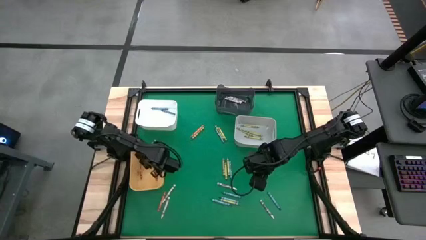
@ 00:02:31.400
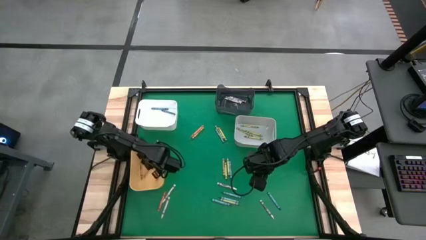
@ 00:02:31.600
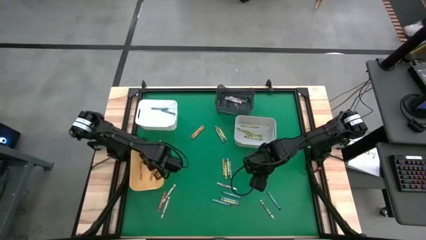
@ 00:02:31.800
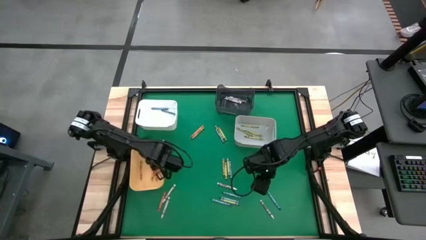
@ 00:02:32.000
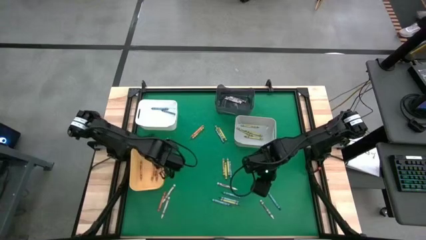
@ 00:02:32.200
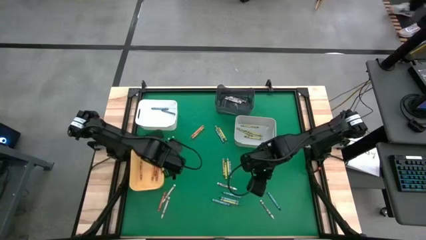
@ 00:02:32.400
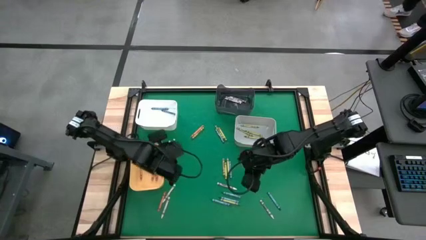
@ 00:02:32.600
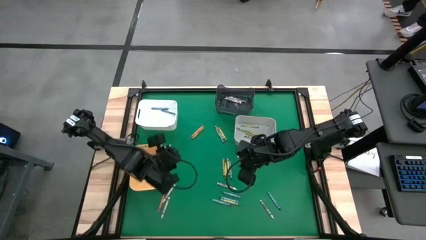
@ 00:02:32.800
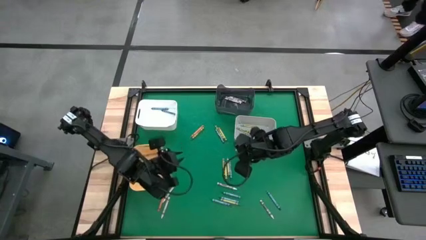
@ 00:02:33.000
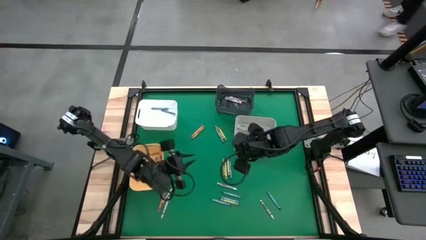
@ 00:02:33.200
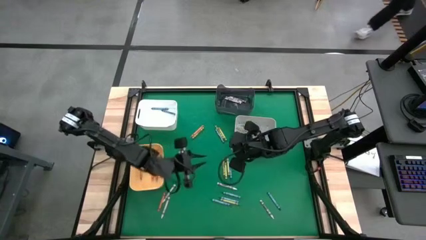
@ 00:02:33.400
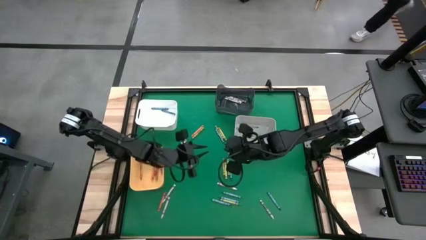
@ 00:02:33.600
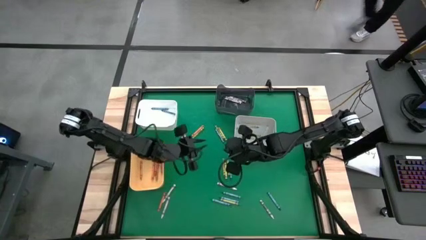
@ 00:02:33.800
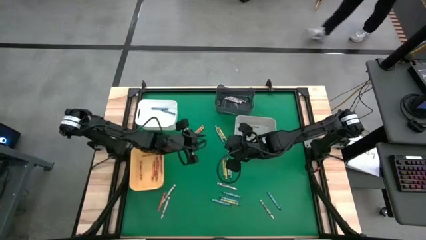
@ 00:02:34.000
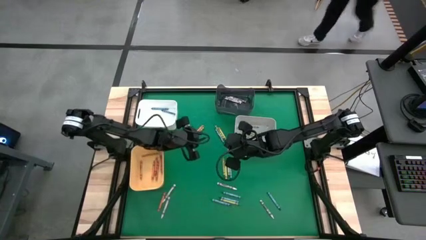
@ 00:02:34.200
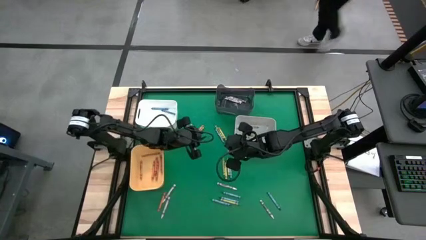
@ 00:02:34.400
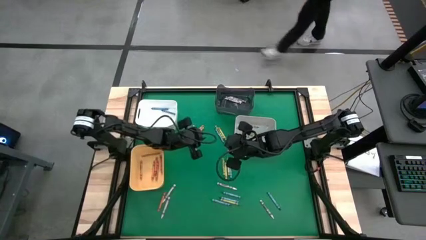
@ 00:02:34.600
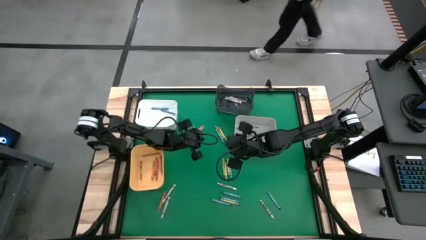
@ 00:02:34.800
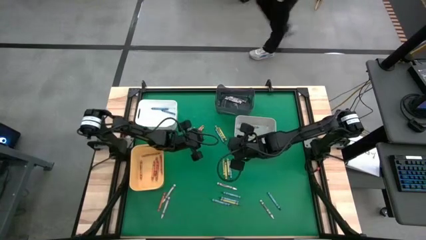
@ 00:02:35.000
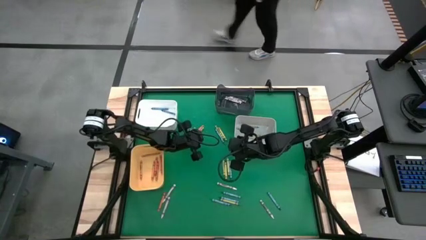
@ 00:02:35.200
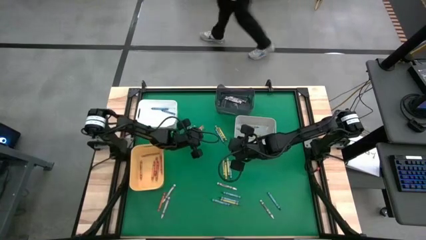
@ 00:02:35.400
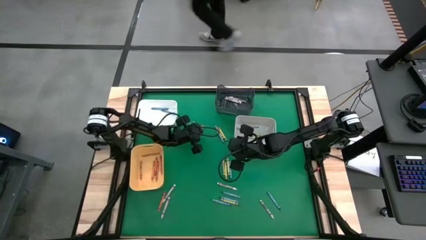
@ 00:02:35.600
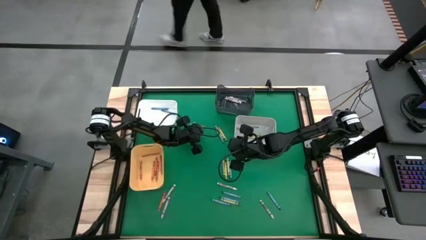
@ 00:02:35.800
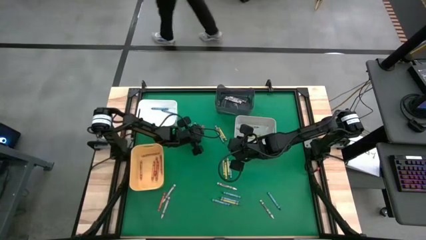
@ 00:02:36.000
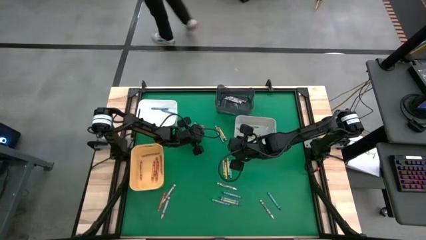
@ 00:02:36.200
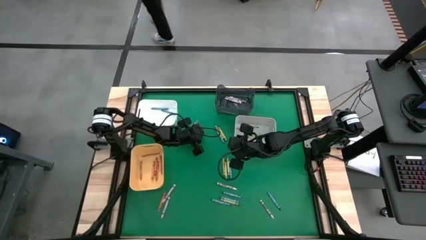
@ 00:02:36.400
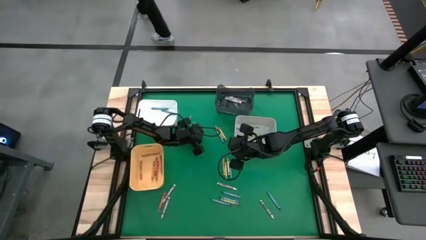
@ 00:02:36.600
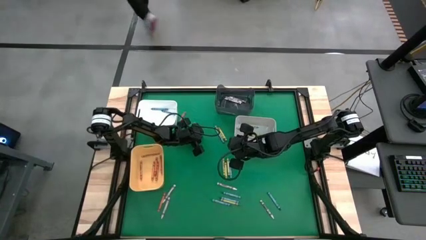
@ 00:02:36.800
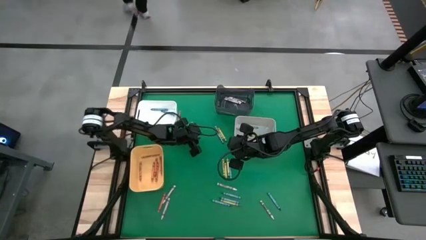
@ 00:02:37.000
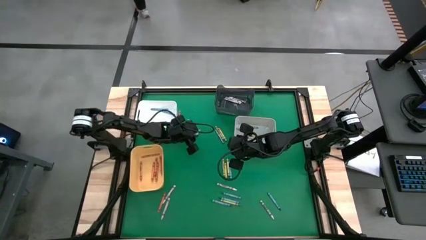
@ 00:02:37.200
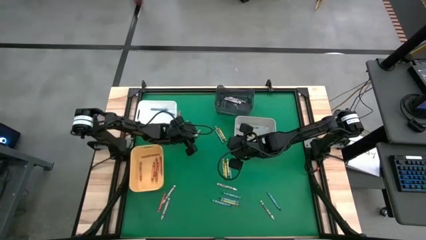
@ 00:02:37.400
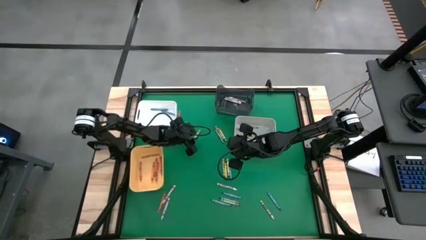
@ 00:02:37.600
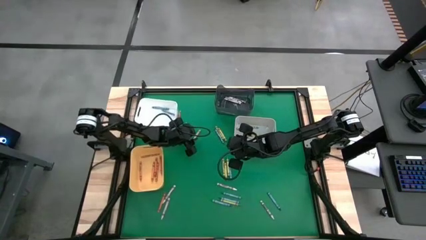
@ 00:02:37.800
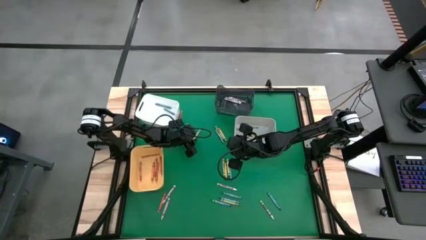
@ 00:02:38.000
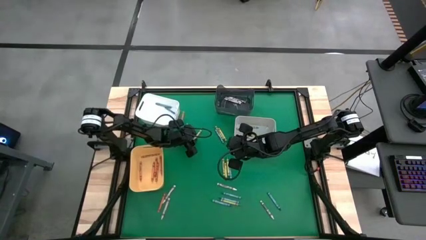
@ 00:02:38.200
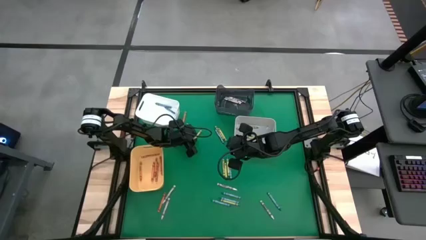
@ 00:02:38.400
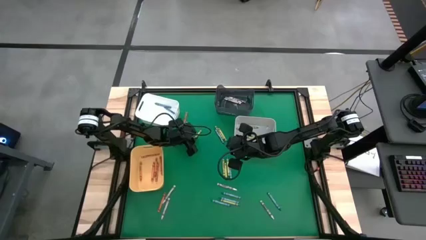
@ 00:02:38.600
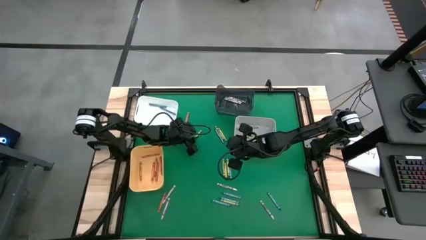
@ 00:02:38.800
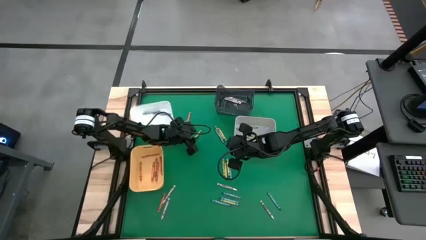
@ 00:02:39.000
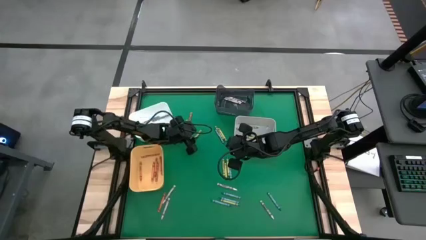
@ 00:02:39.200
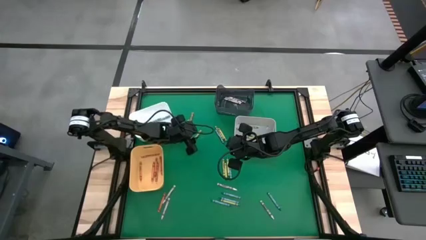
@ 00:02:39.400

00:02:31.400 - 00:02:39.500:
Task: Sort crayons
Put the green crayon into the gray bin

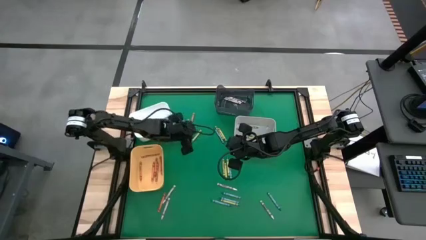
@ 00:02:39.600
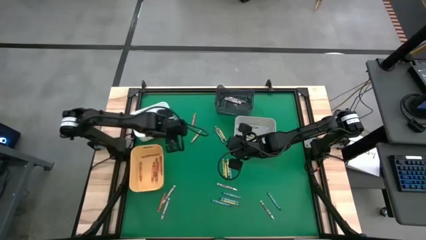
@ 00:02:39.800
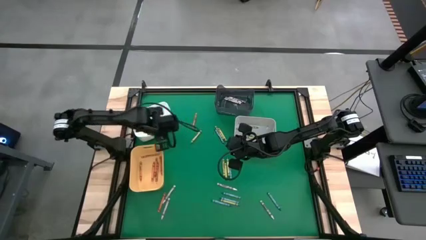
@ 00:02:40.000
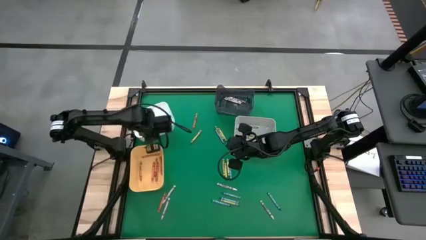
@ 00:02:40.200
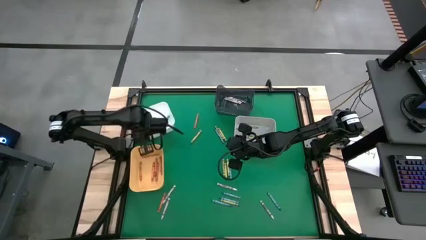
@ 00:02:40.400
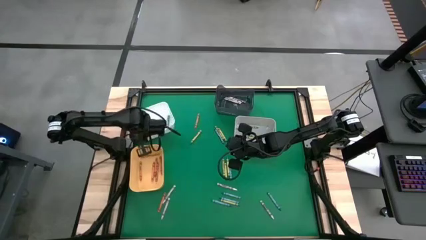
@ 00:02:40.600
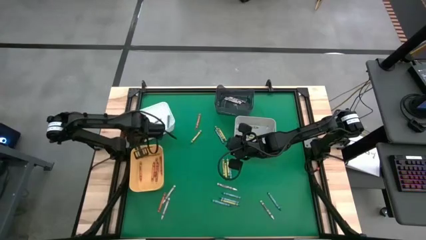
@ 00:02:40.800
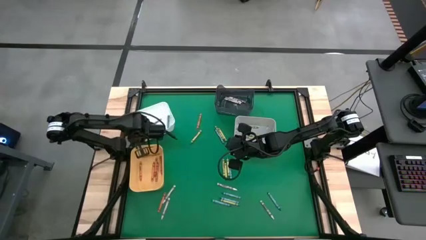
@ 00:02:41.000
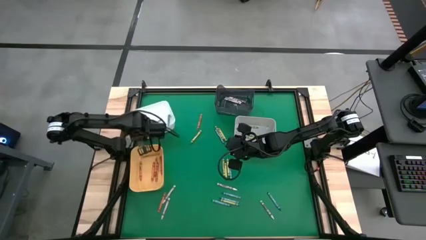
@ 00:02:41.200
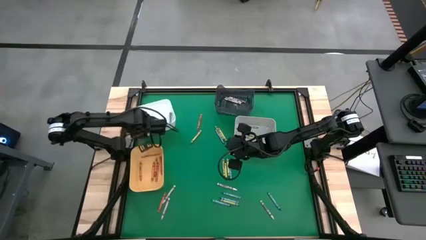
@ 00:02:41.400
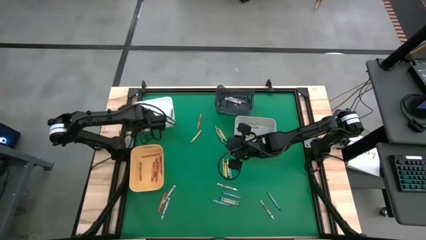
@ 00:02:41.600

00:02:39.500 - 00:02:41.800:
Adjust the white bin

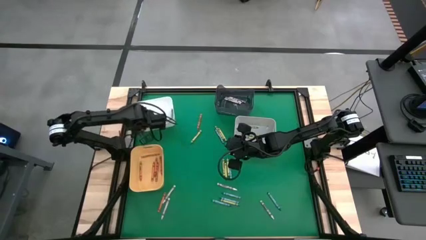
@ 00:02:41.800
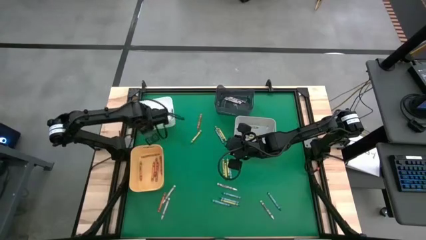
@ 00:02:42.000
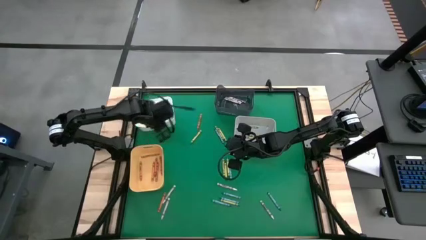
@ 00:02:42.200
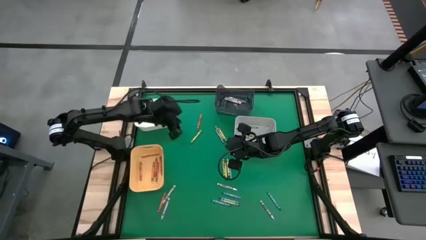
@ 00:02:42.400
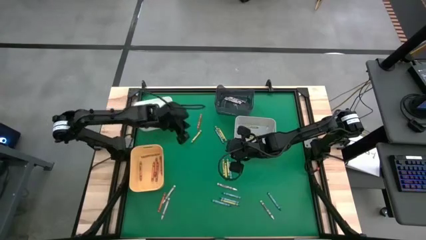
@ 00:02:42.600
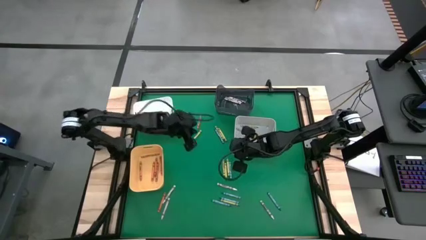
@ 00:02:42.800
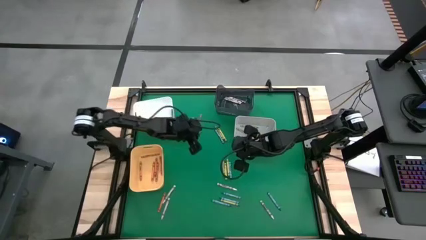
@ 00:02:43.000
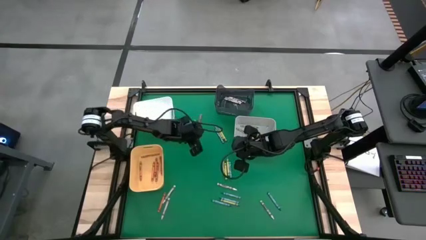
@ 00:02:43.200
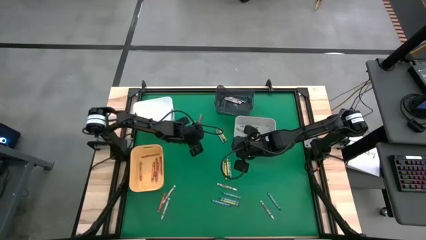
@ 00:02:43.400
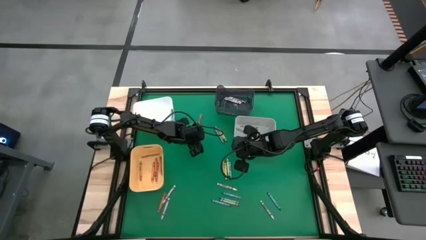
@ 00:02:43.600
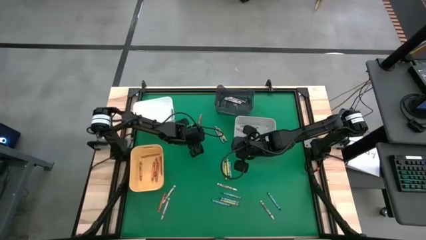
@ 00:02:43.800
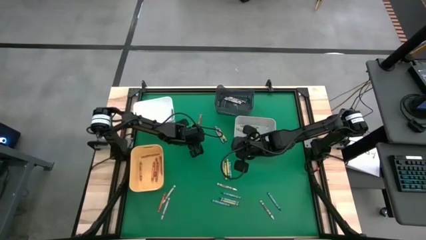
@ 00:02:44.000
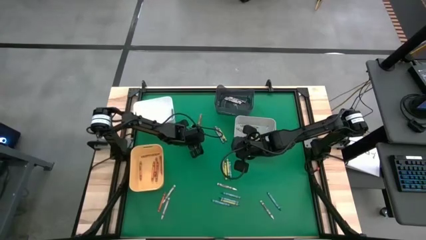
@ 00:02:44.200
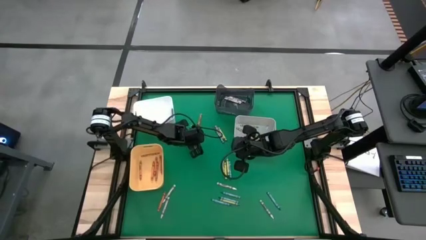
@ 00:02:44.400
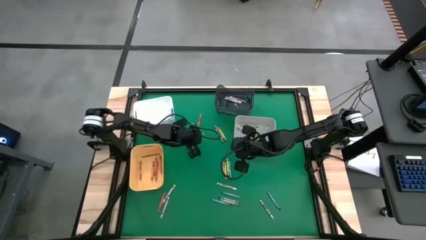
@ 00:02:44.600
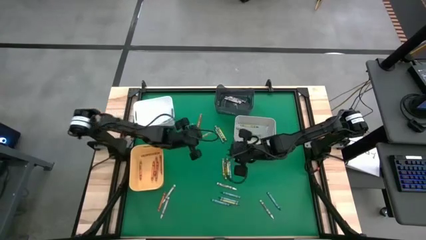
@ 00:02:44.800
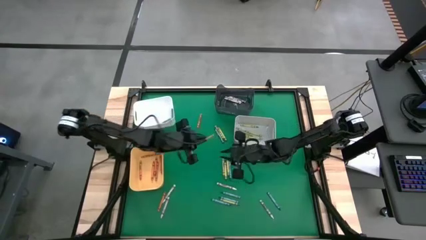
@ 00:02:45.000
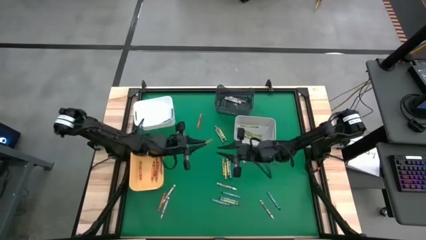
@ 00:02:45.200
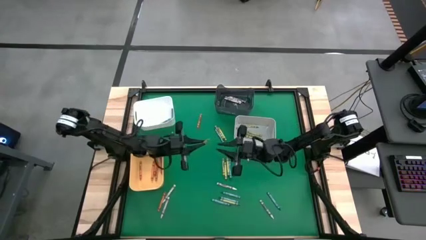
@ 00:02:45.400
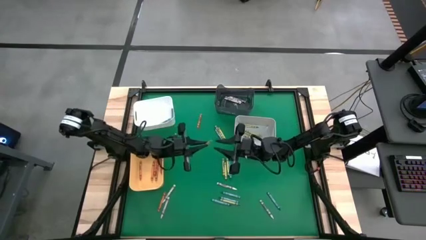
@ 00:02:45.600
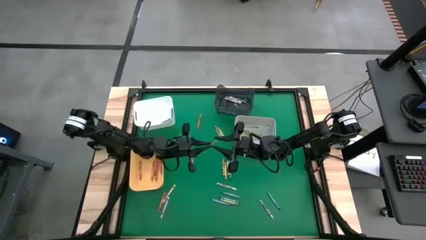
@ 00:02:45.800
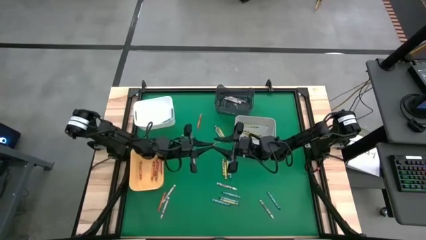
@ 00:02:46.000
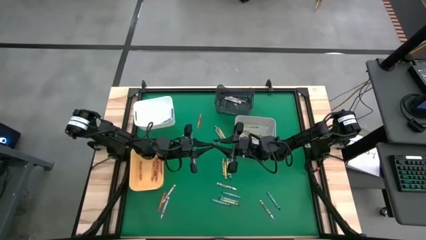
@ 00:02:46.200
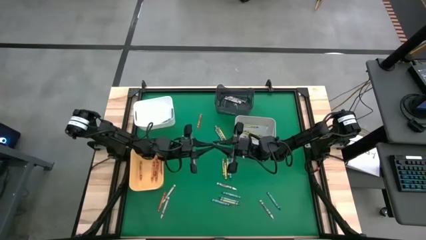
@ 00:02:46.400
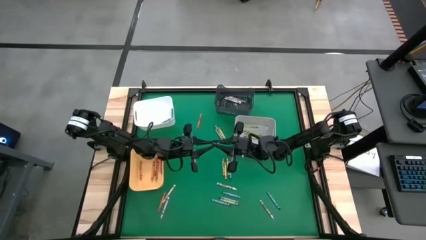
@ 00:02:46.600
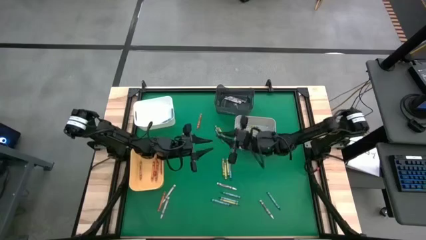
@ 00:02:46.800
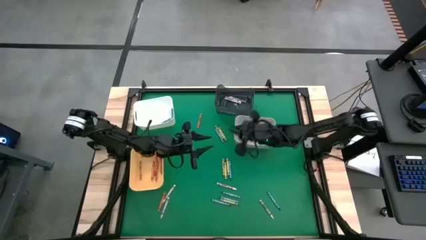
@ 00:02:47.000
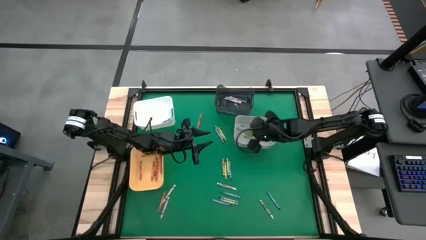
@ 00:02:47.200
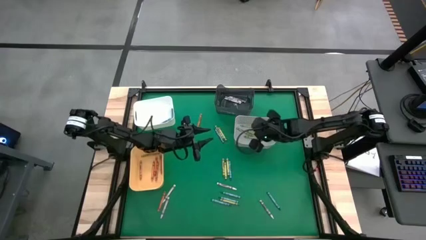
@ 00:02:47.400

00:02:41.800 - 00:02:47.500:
Put the green crayon into the gray bin
